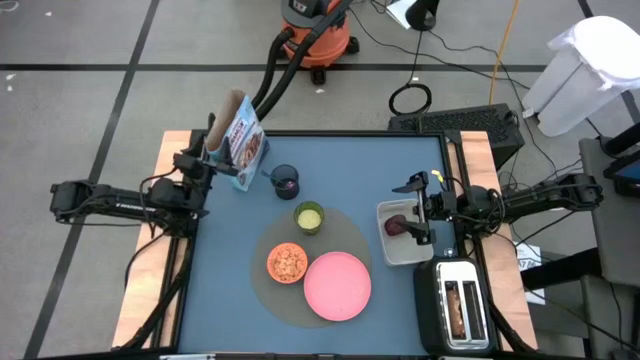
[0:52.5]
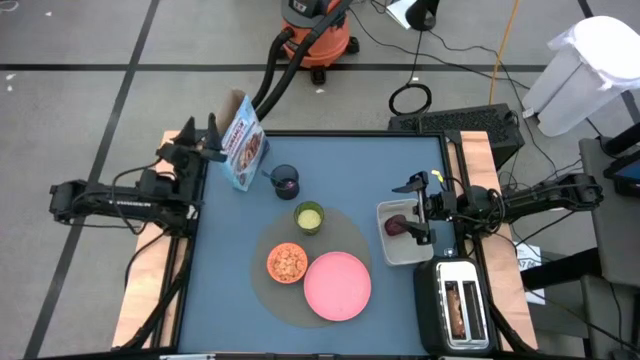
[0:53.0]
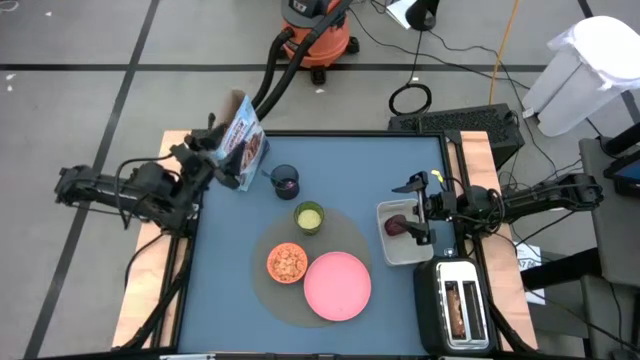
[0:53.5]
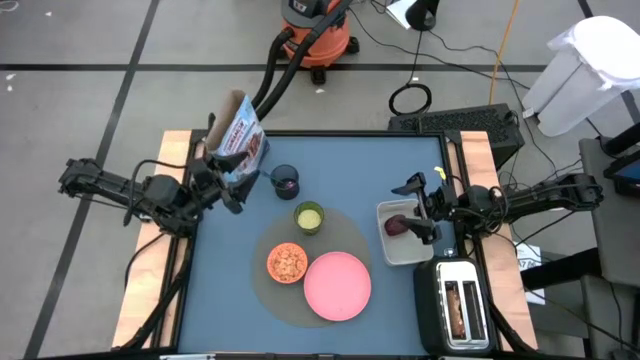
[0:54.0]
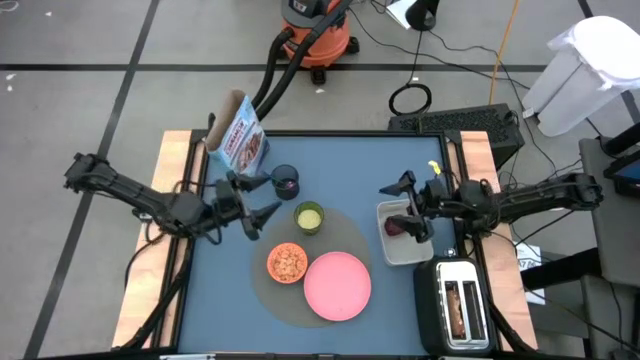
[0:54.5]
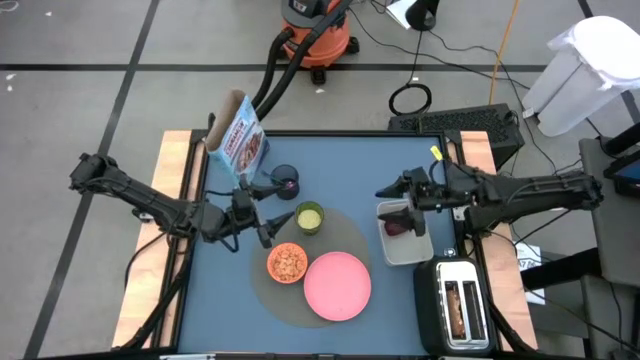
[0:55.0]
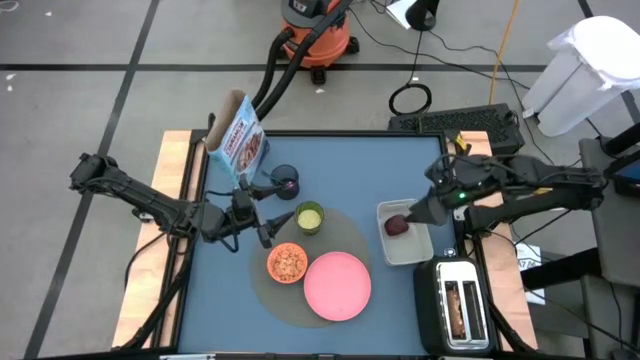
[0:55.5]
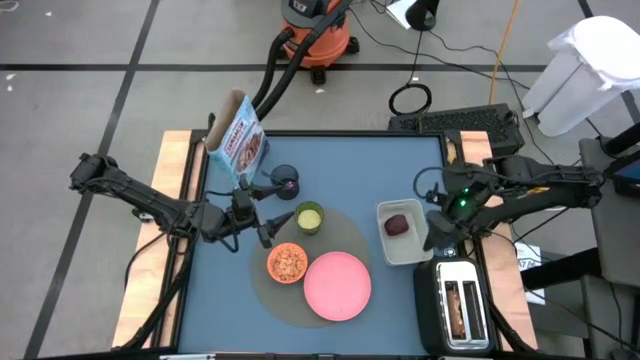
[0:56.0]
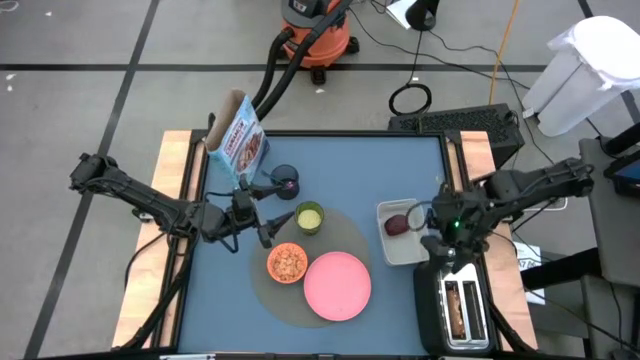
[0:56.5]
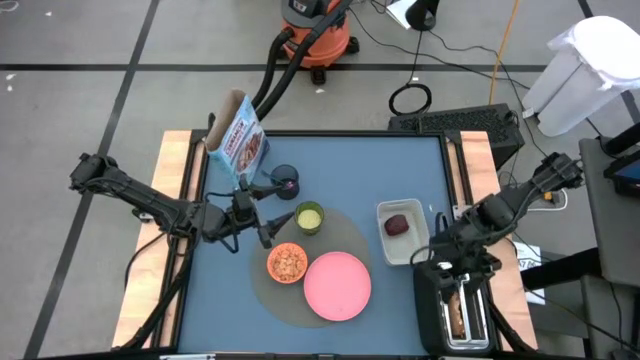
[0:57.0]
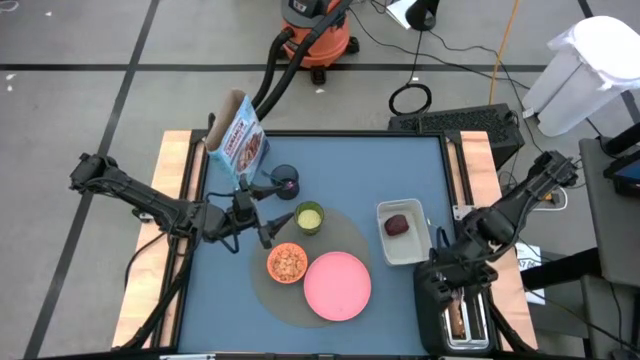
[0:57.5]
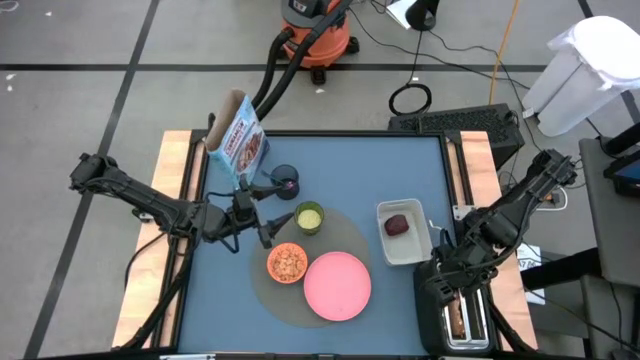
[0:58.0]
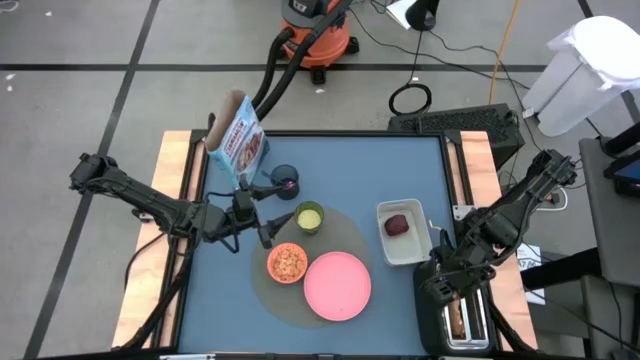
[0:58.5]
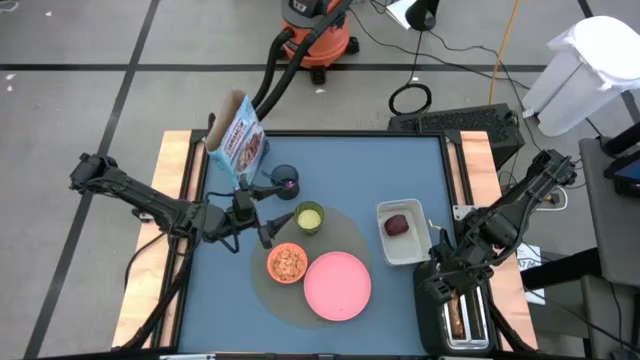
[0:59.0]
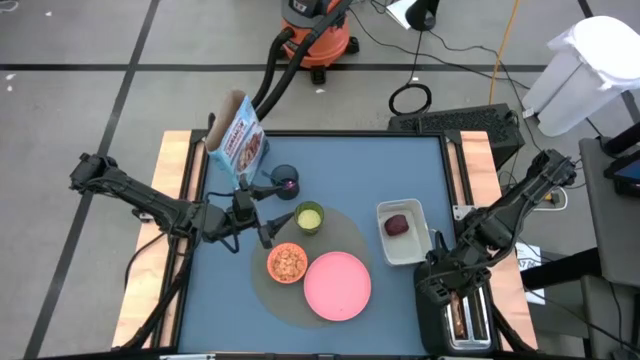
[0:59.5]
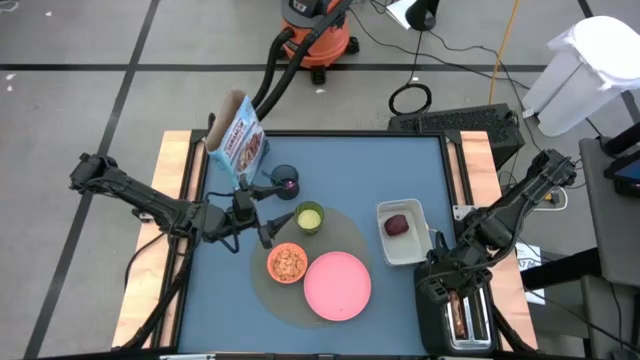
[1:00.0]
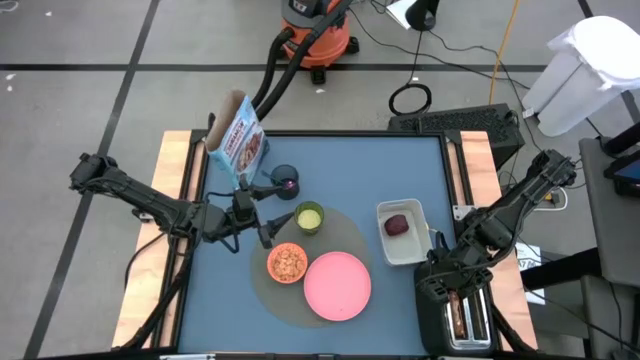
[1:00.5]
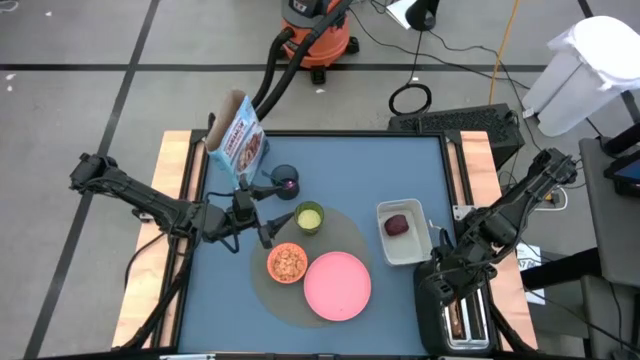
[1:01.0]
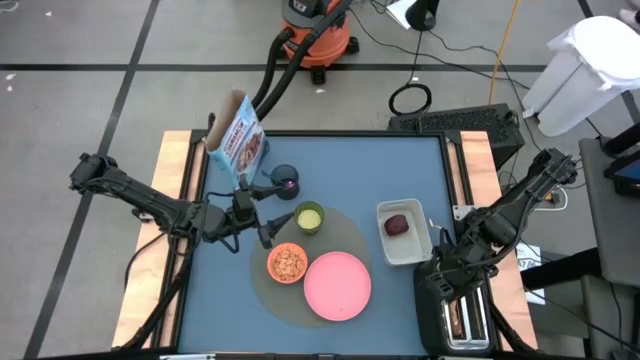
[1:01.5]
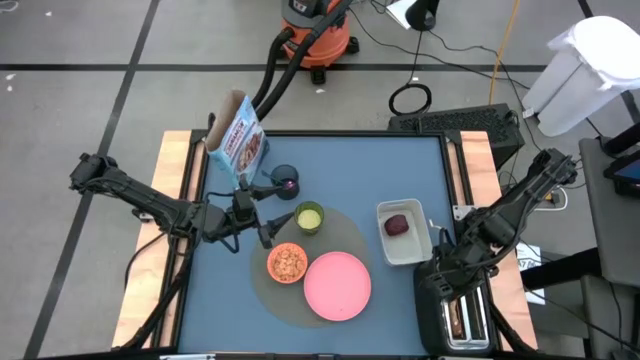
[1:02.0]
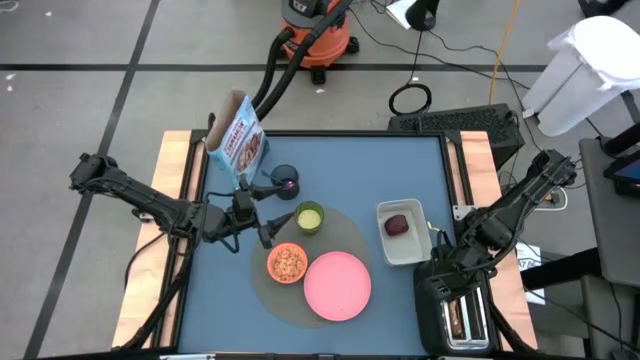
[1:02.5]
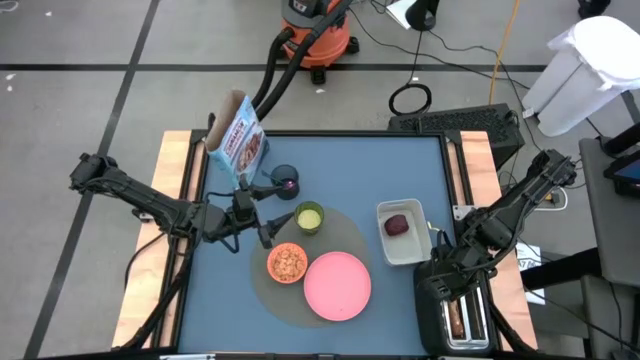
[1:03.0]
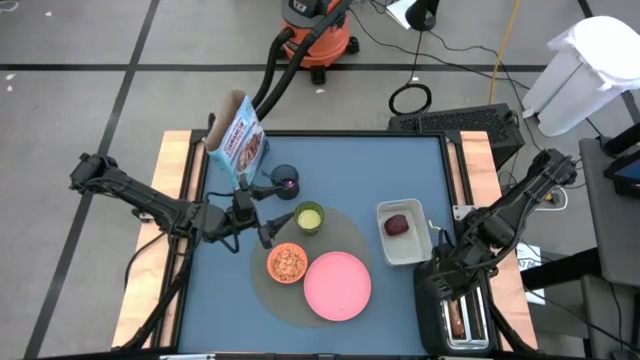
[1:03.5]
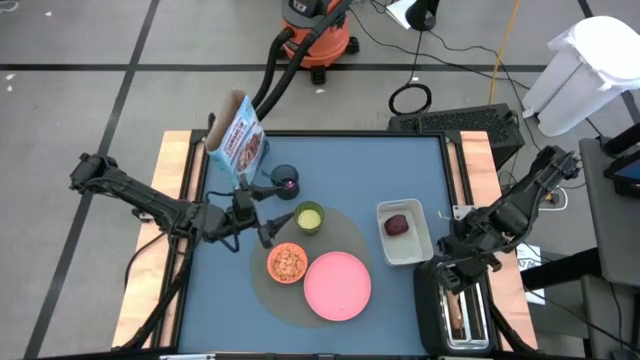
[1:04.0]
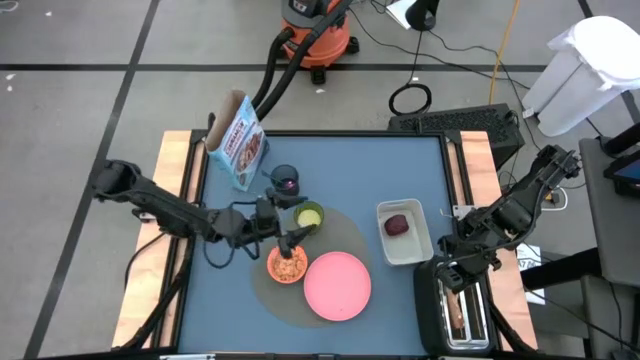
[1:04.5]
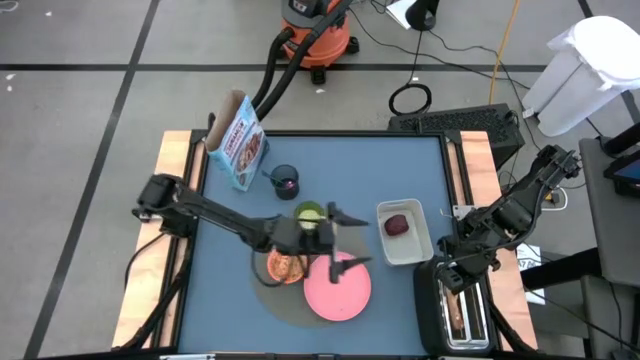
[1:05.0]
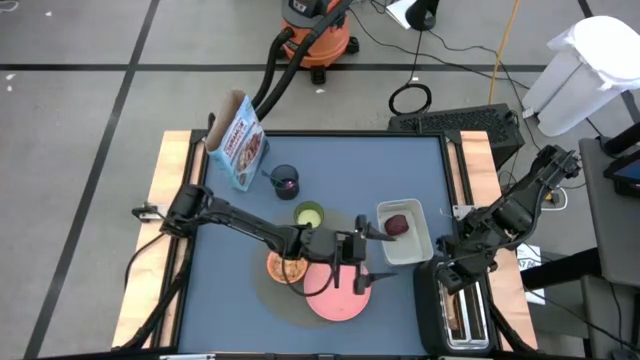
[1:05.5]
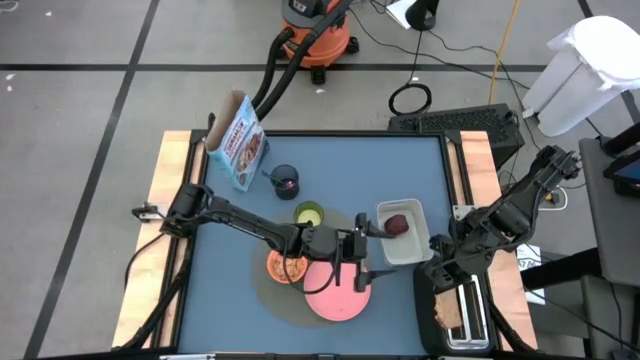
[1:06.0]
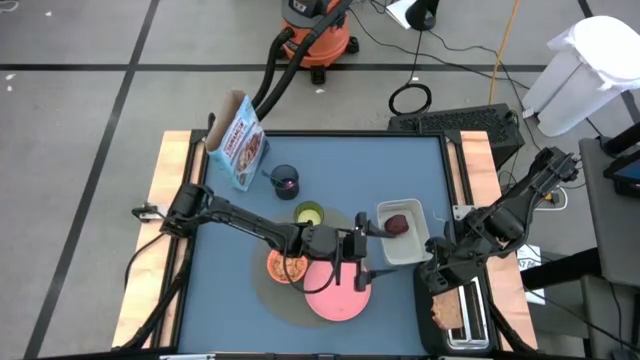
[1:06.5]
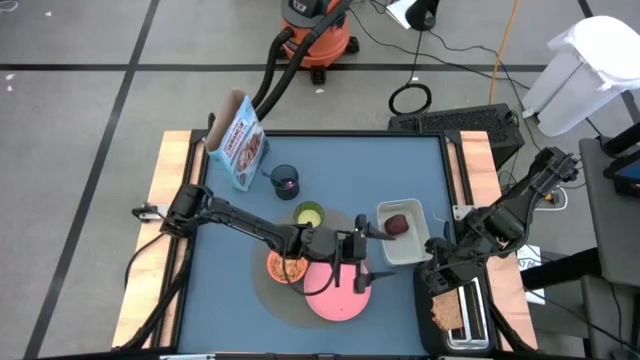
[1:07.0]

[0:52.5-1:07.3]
Task: Arrange a breakfast setting
Put the toasted bread on the pink plate

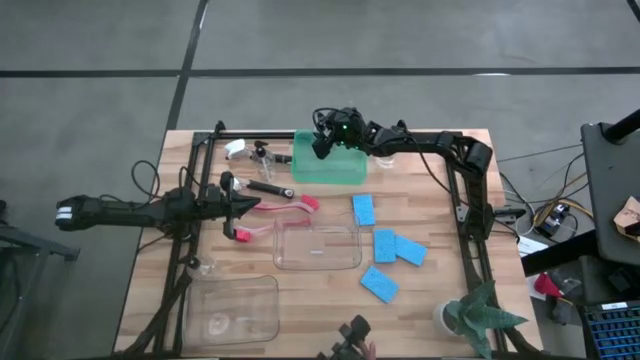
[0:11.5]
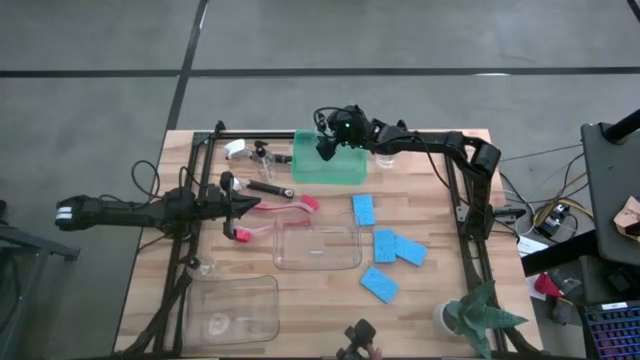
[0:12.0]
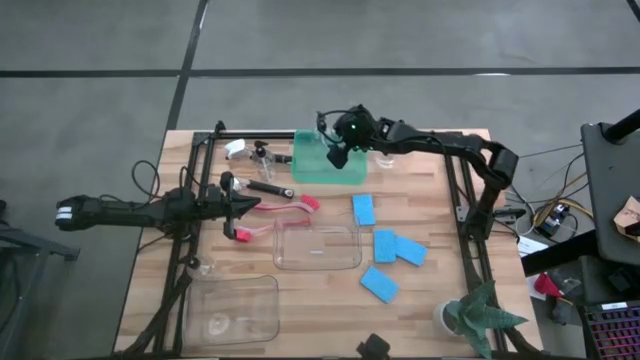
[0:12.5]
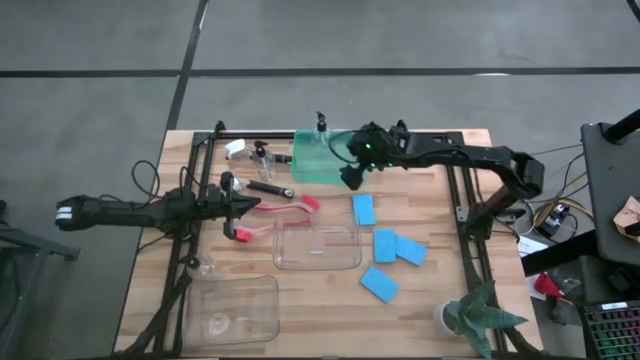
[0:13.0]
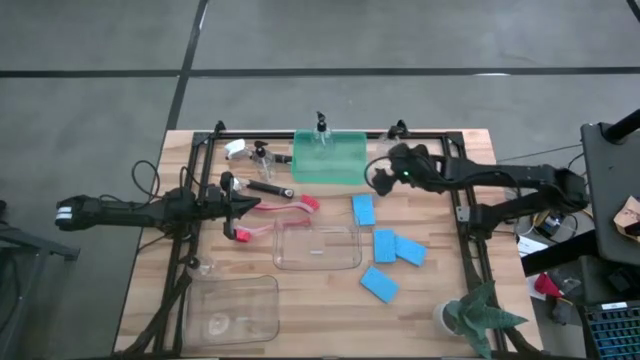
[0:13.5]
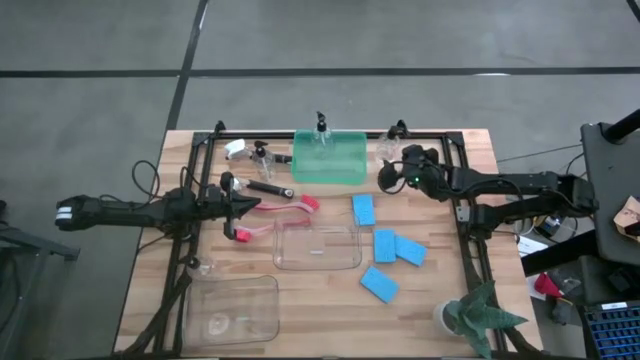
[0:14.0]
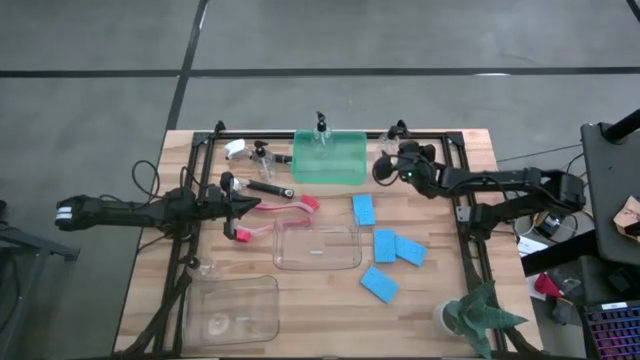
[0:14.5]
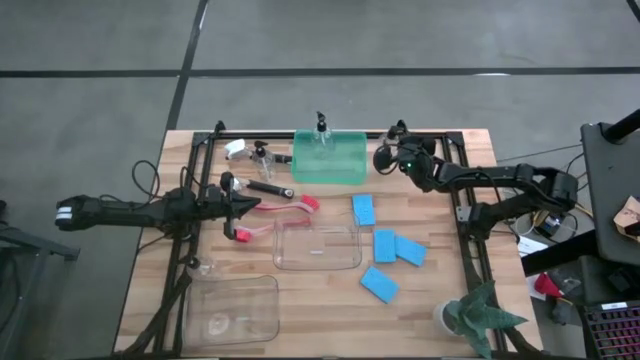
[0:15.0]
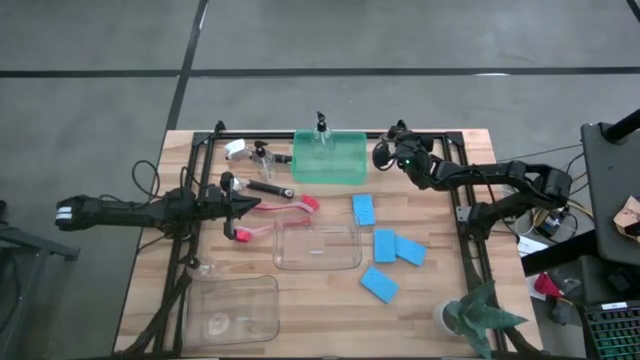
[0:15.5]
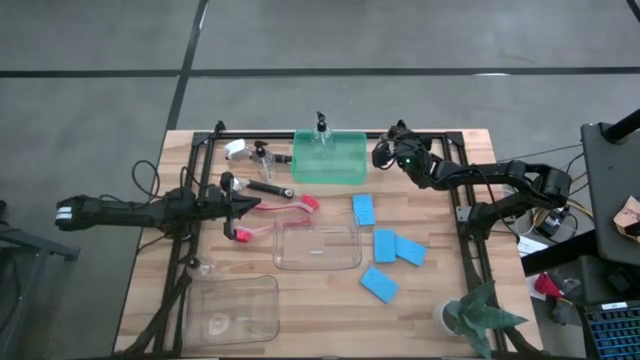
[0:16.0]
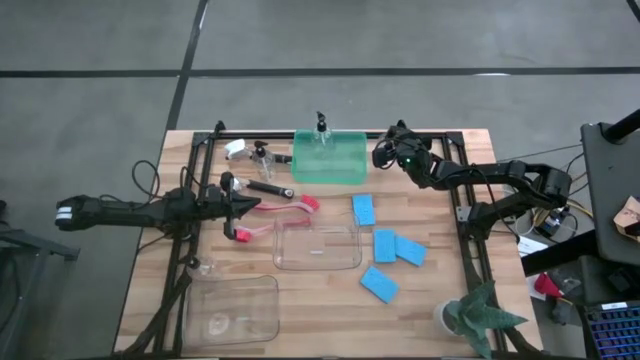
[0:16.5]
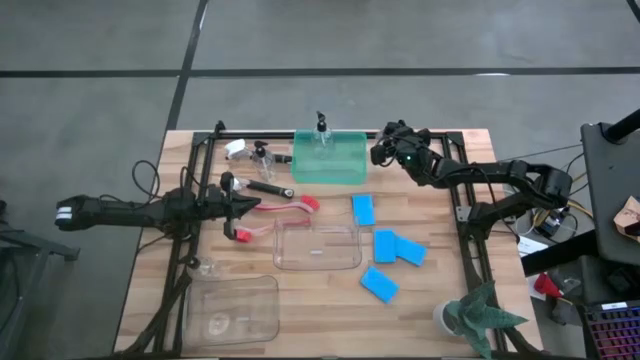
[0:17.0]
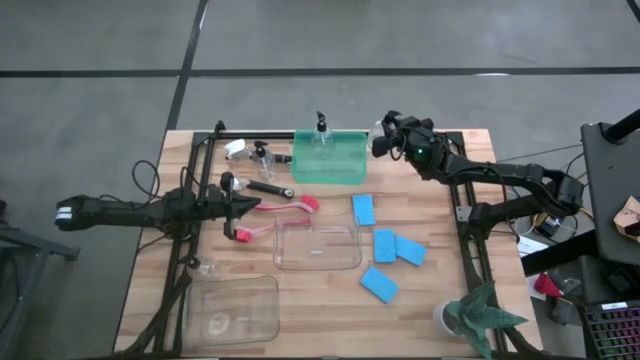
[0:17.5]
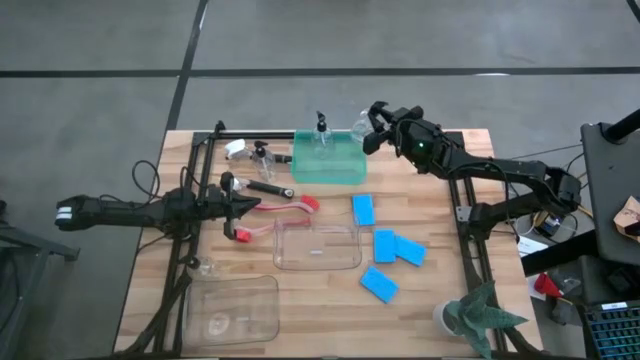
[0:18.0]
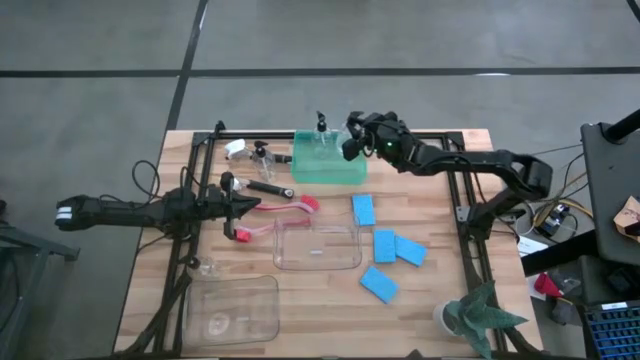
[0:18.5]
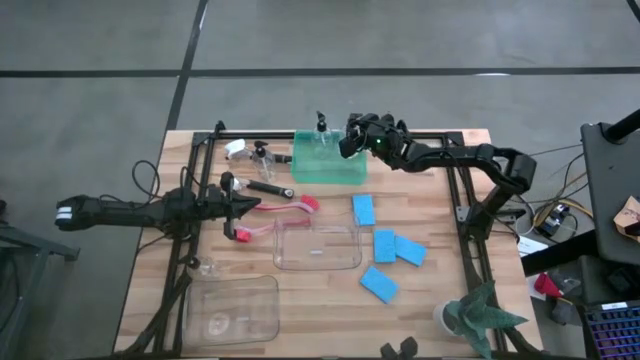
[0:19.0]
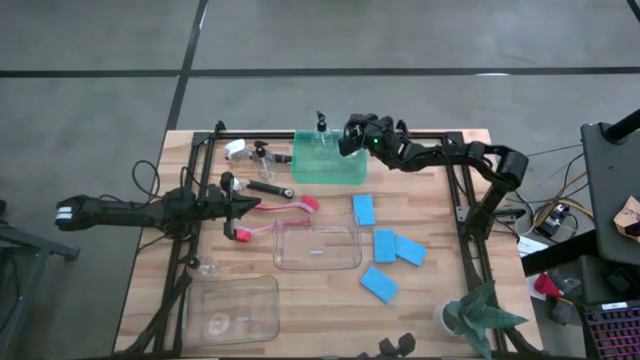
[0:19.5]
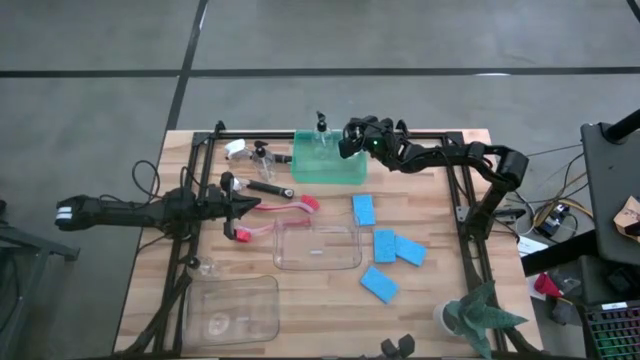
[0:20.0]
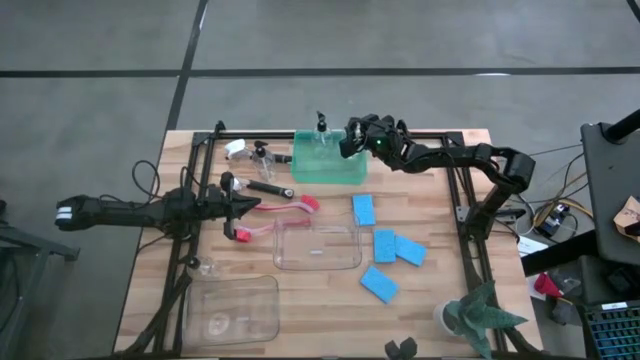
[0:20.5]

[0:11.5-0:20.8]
Task: Pick & Place Kitchen Sink Supplies
Put the transparent soap dispenser into the green bin
